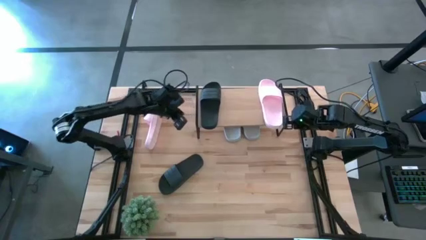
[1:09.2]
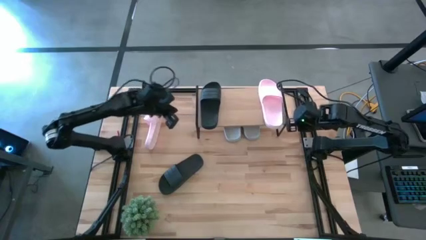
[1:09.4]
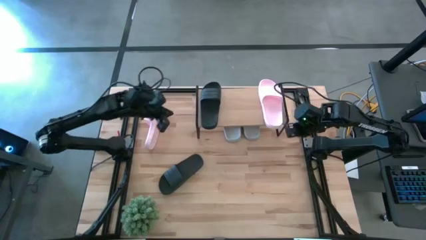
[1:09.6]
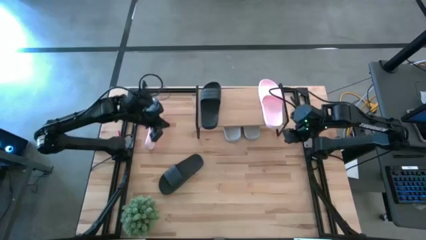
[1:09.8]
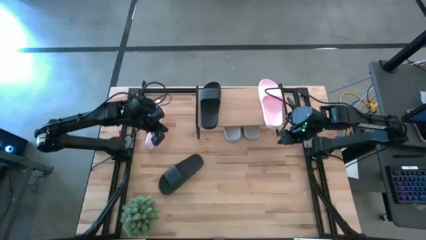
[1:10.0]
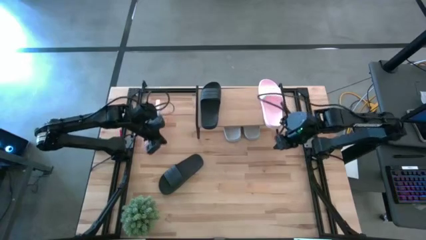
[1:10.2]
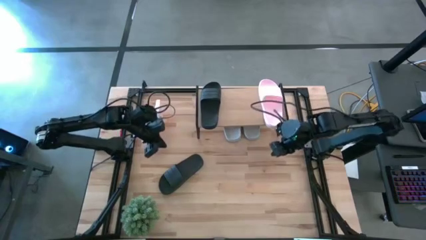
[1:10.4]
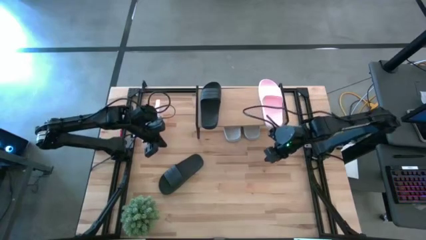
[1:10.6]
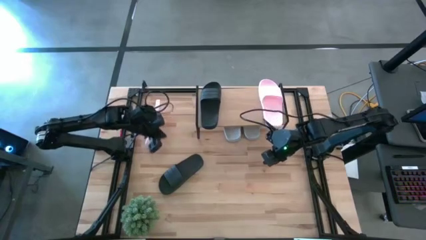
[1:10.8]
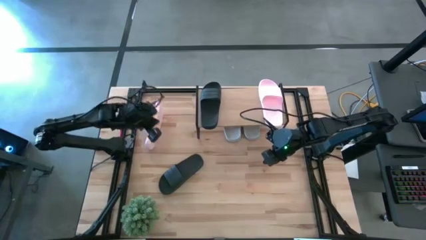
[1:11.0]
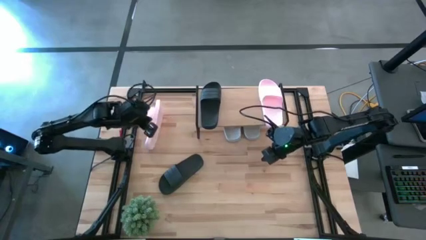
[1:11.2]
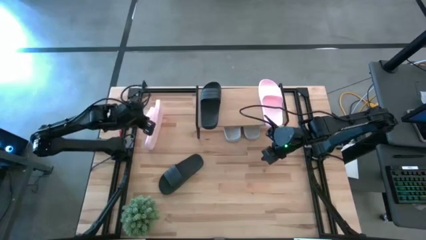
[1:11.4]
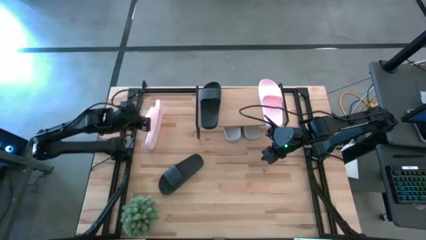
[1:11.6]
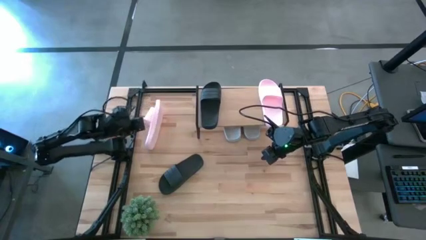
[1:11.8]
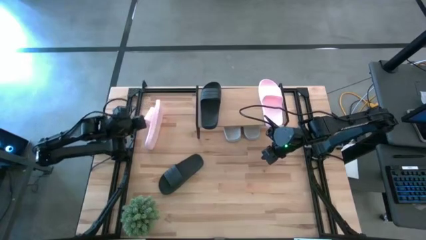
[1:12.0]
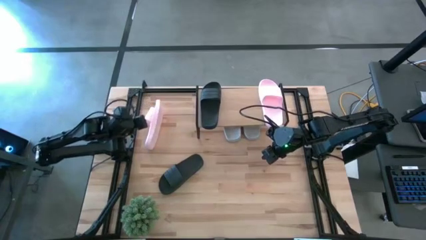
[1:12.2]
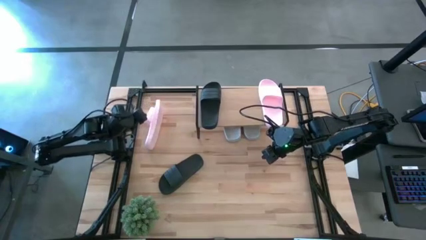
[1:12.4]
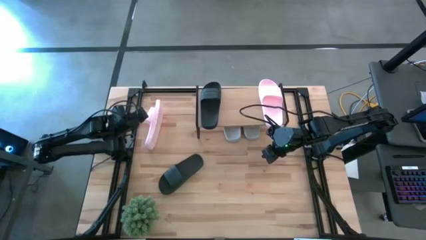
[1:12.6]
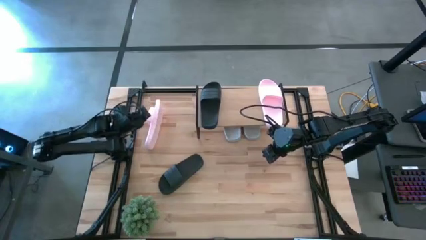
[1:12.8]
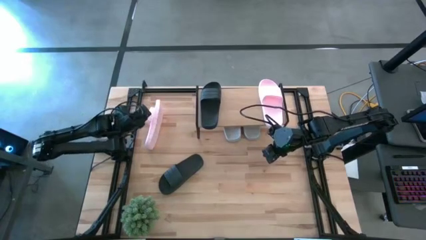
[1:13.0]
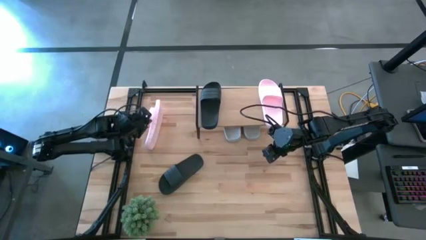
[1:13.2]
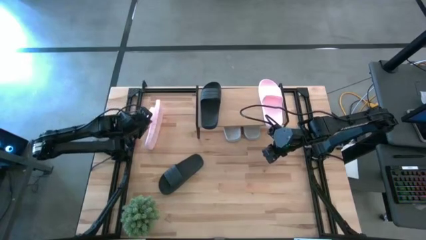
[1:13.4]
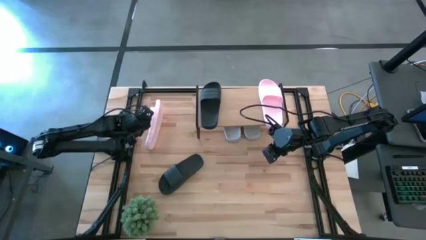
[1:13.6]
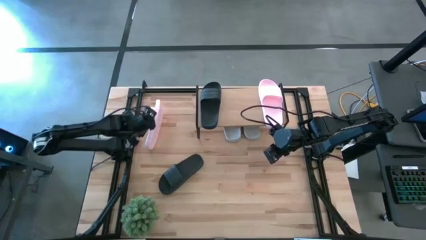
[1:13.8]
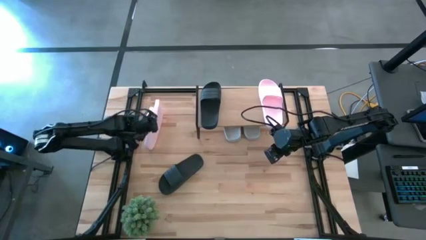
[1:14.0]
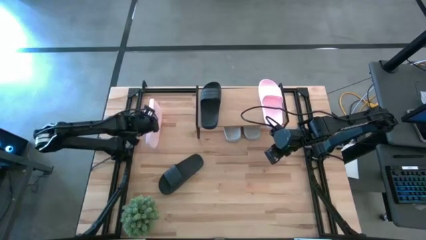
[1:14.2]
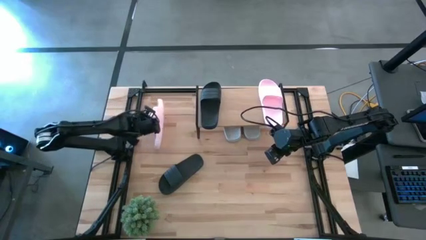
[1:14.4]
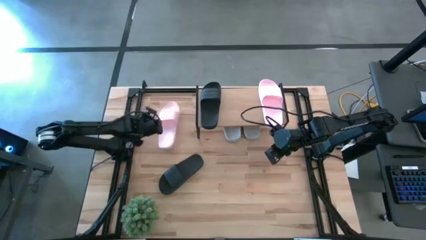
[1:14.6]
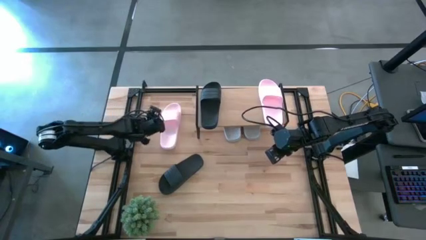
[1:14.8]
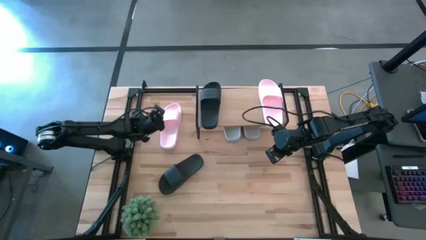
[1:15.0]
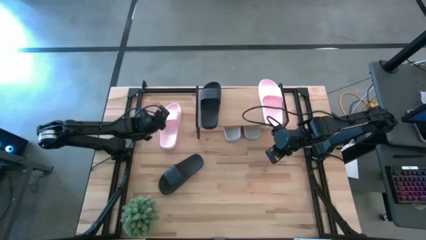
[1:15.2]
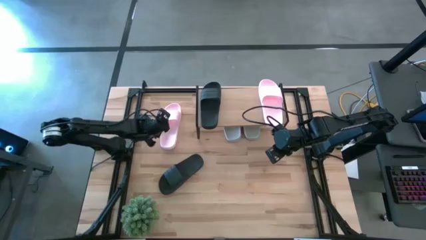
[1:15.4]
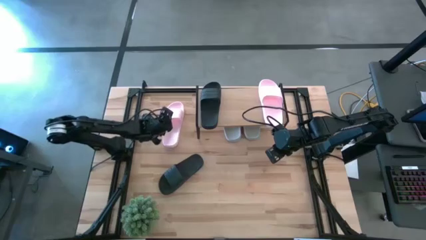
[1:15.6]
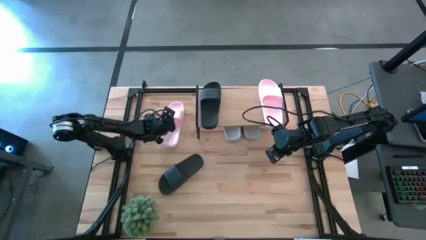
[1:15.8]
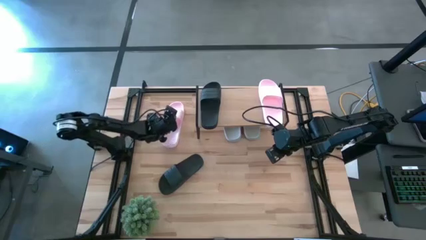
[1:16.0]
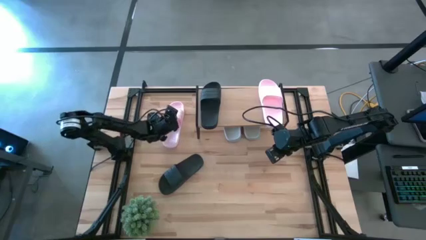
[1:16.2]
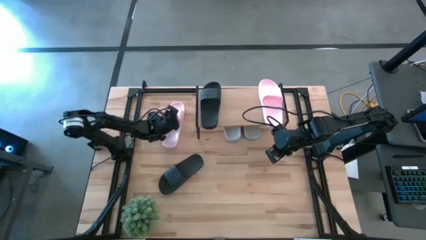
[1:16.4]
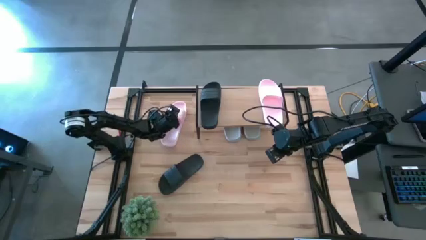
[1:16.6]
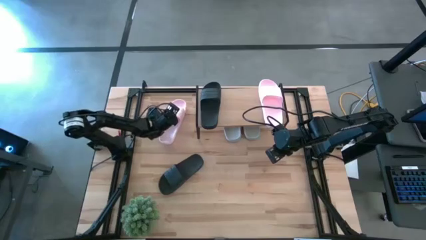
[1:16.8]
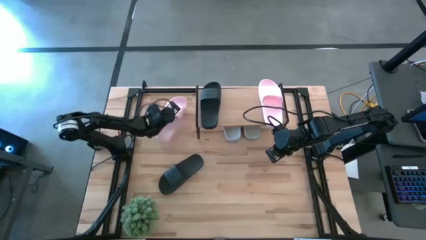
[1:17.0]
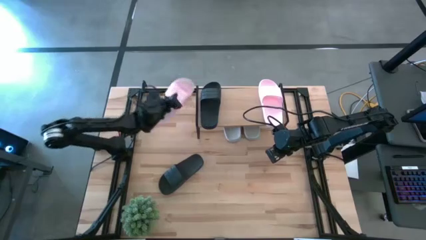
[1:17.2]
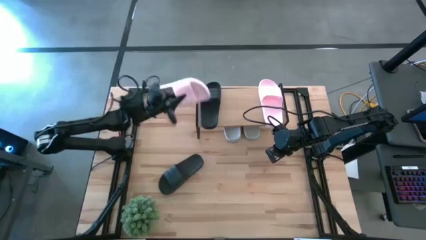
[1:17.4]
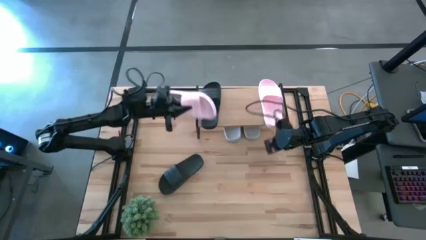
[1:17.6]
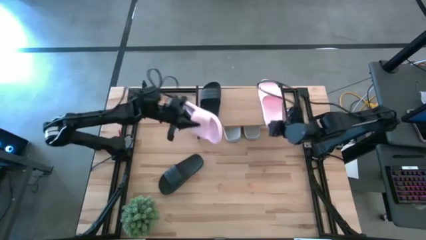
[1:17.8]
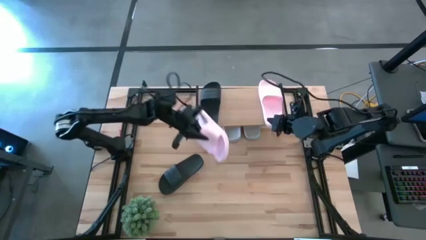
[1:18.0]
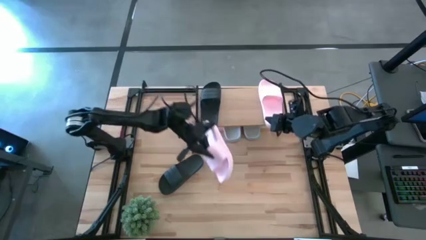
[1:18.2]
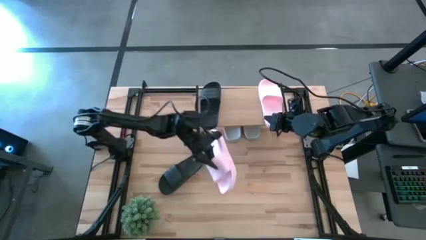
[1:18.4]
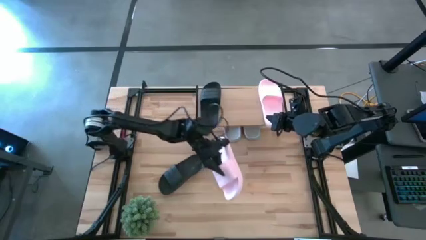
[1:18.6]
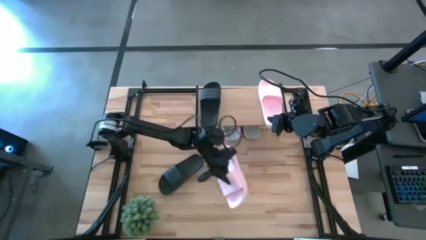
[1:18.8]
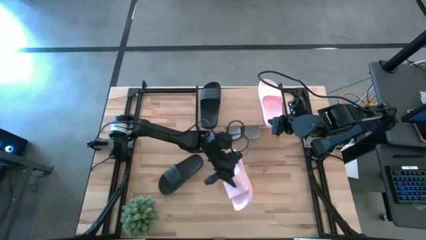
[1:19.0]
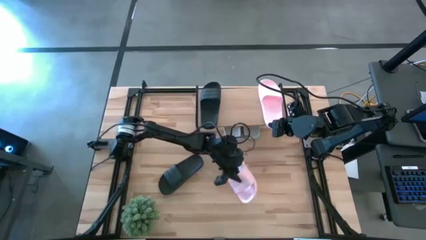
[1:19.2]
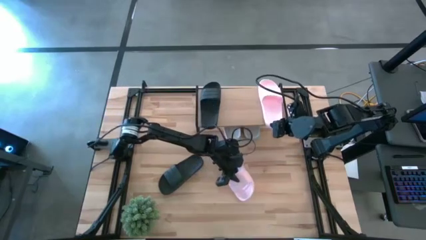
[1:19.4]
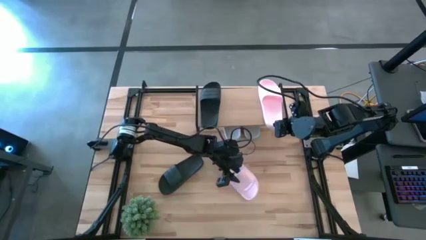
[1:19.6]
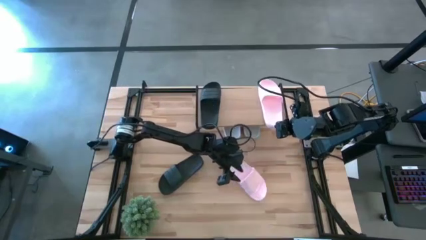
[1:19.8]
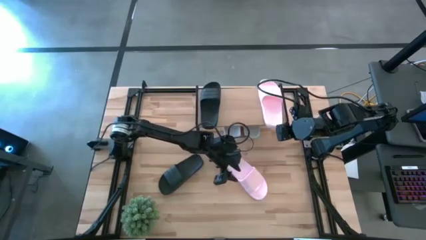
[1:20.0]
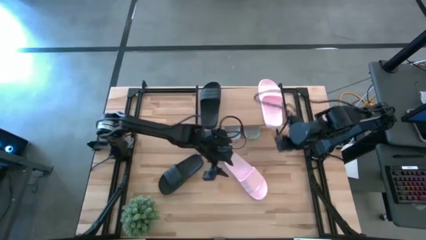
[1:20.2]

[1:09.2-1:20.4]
Task: Pick and place slides into the shelf
Put the pink slide on the shelf
